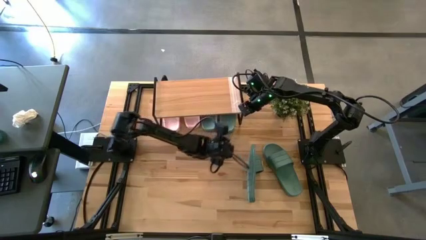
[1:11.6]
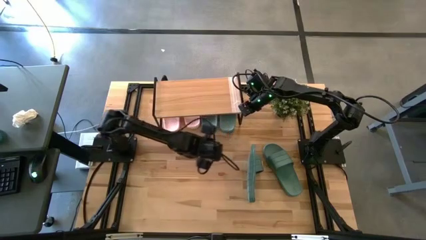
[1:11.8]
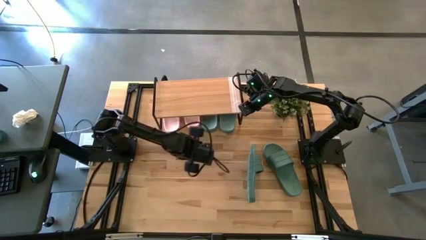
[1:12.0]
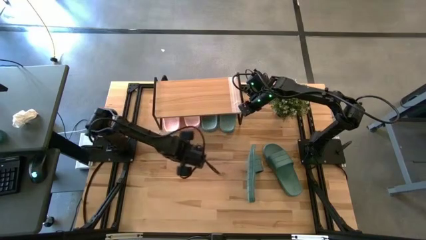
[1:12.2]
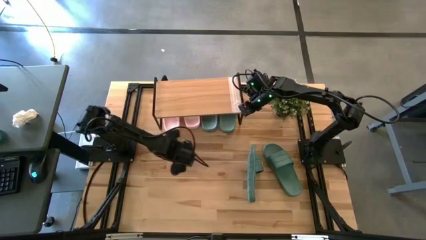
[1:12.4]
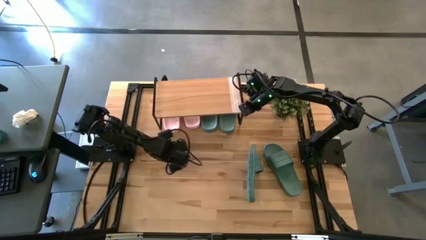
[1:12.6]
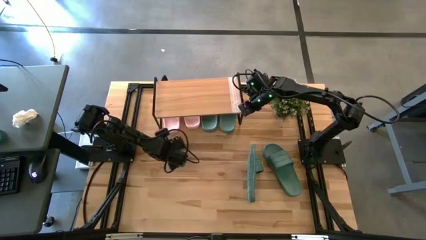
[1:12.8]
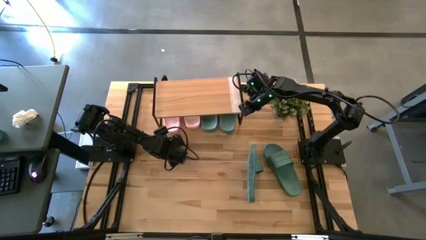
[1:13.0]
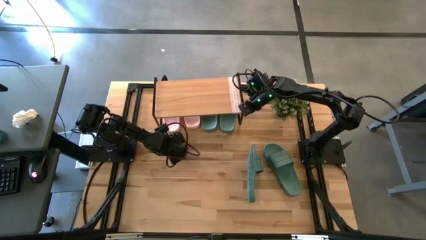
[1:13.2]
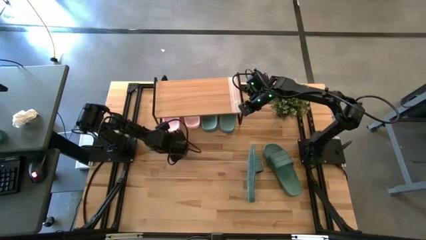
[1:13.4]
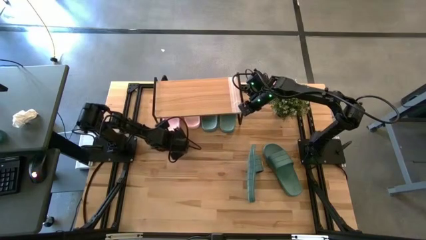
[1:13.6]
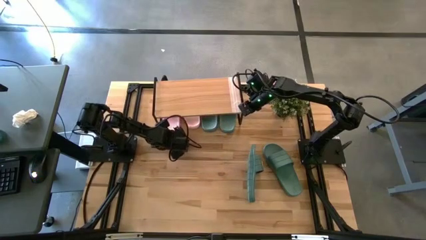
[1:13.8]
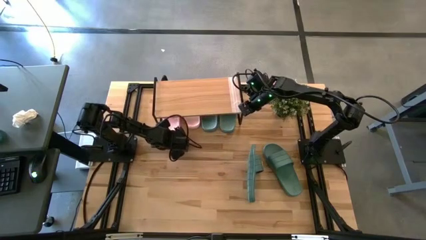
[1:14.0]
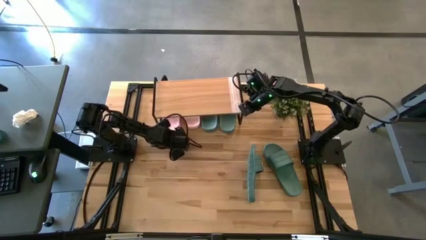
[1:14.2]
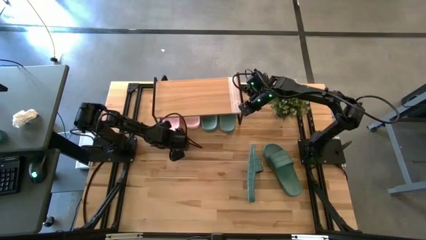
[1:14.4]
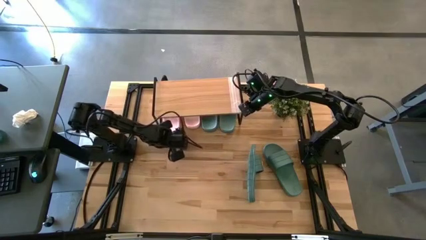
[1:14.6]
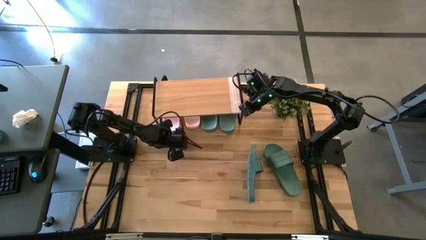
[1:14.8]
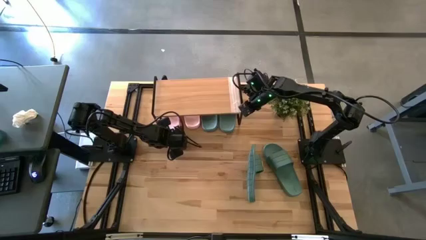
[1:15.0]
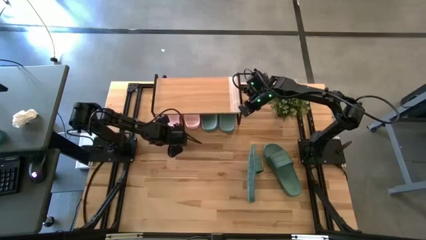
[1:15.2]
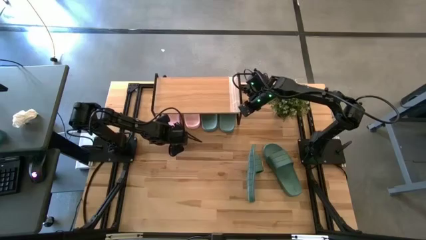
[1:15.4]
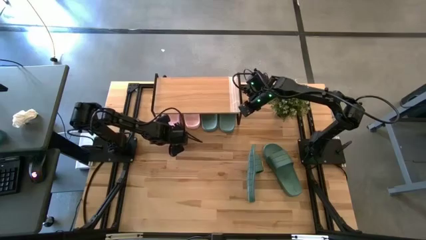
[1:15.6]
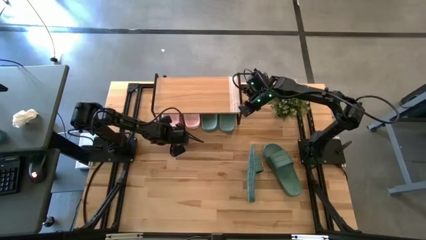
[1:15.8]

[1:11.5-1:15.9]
Task: Pick and place slides into the shelf
Adjust the left pink slipper on the bottom shelf

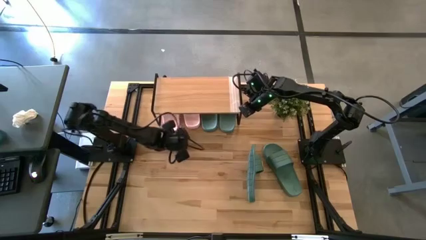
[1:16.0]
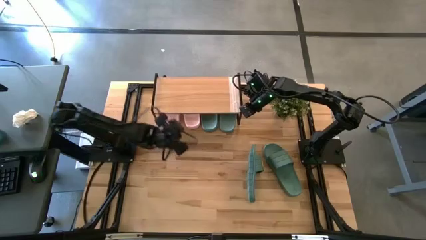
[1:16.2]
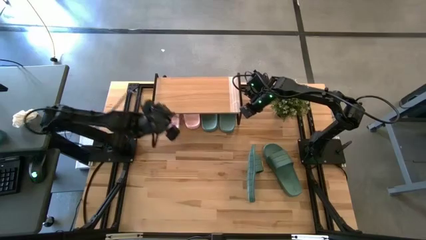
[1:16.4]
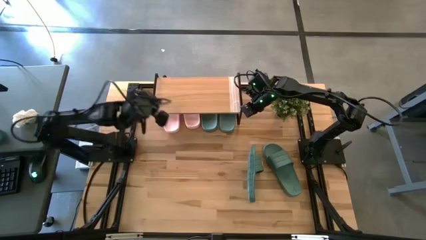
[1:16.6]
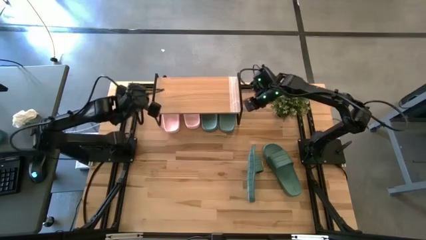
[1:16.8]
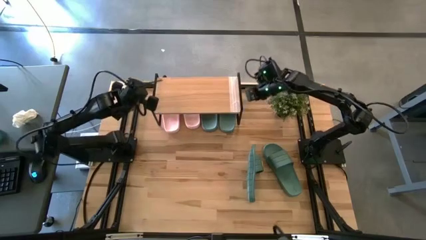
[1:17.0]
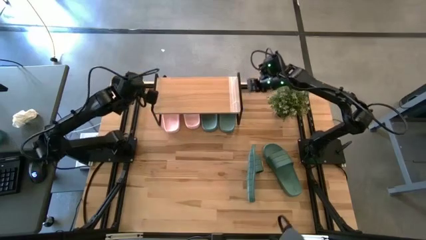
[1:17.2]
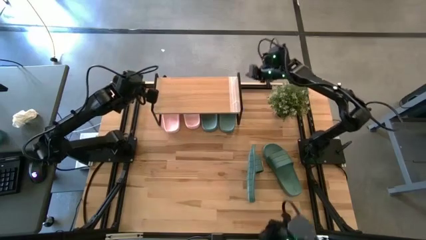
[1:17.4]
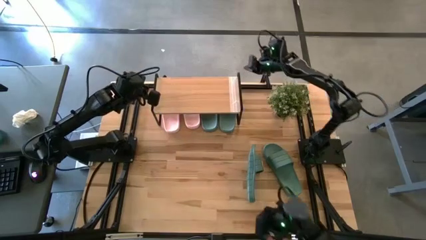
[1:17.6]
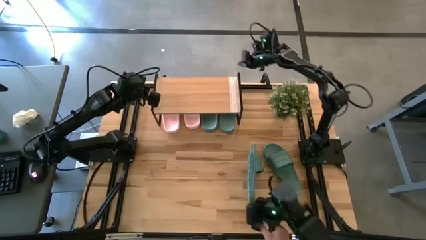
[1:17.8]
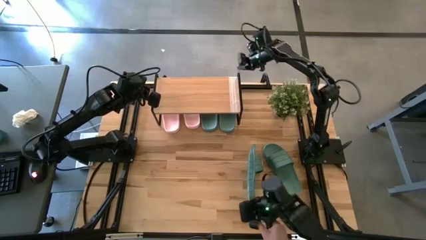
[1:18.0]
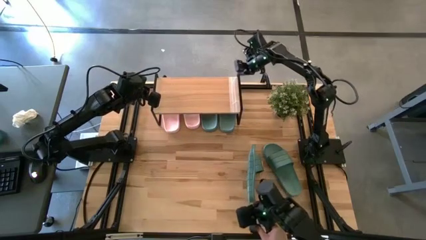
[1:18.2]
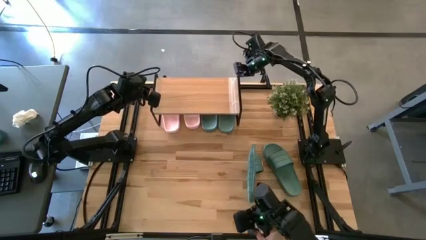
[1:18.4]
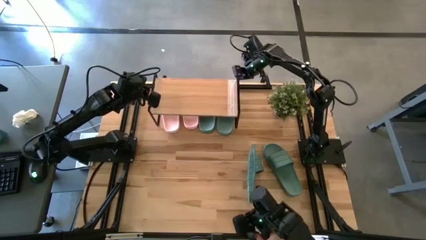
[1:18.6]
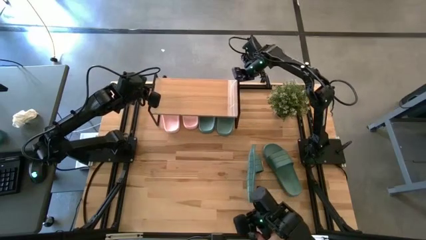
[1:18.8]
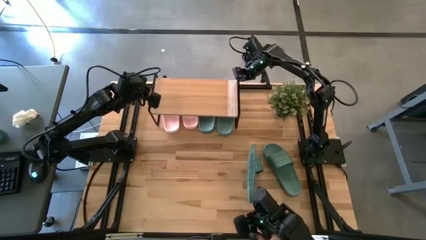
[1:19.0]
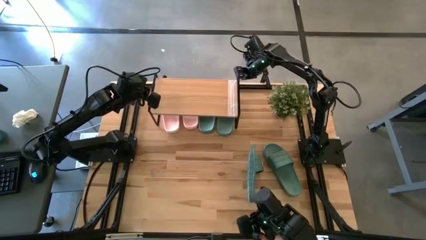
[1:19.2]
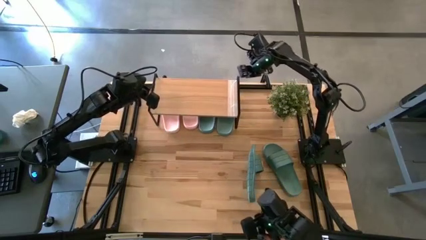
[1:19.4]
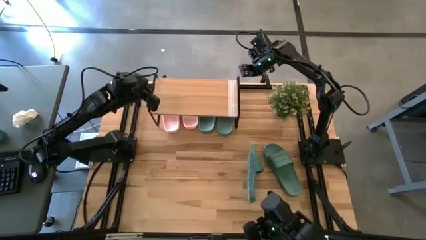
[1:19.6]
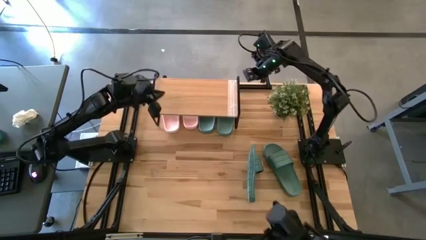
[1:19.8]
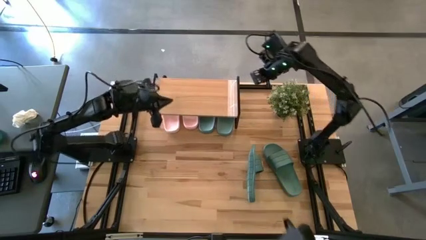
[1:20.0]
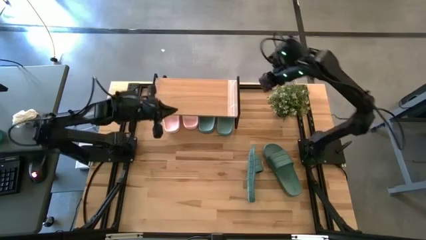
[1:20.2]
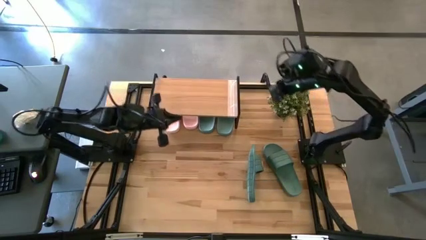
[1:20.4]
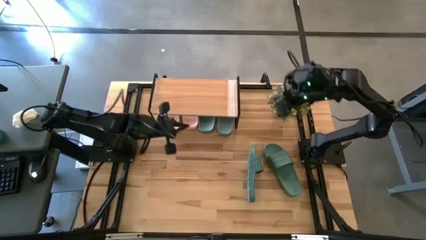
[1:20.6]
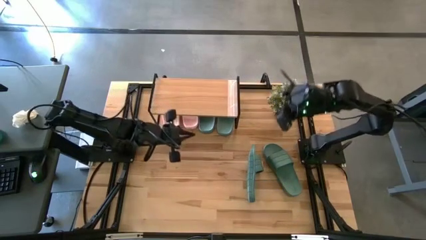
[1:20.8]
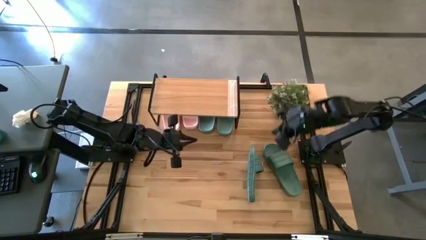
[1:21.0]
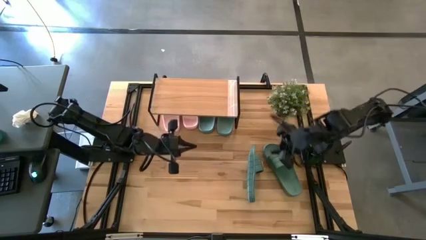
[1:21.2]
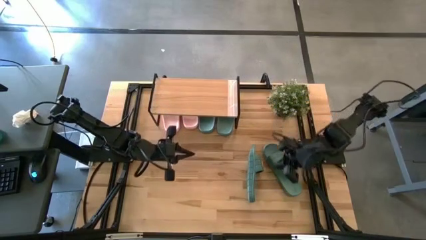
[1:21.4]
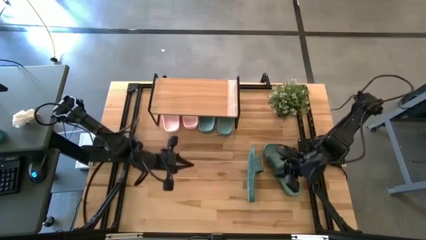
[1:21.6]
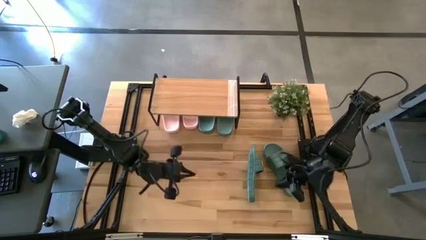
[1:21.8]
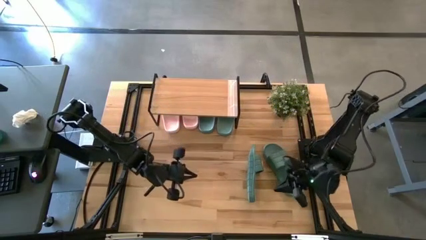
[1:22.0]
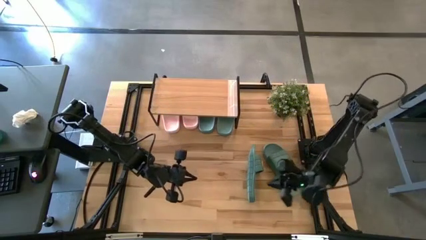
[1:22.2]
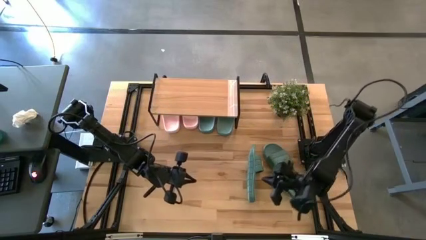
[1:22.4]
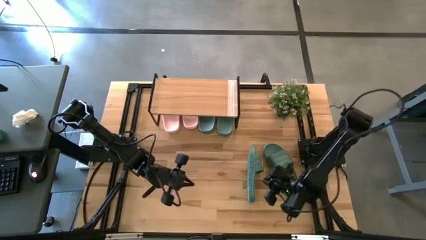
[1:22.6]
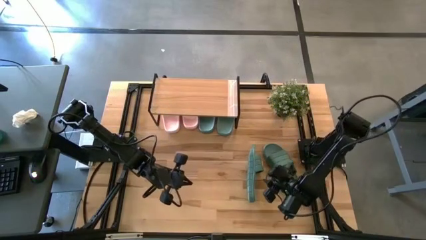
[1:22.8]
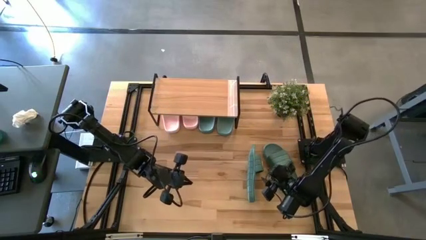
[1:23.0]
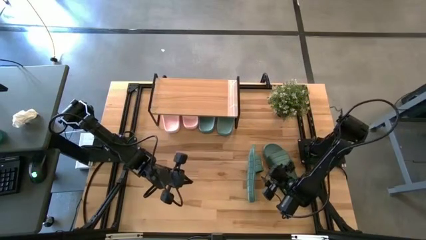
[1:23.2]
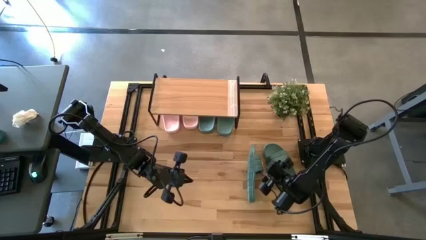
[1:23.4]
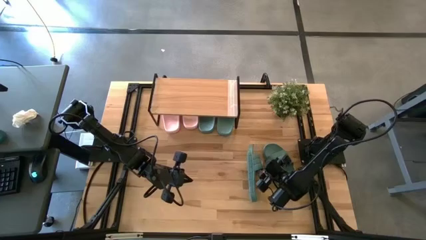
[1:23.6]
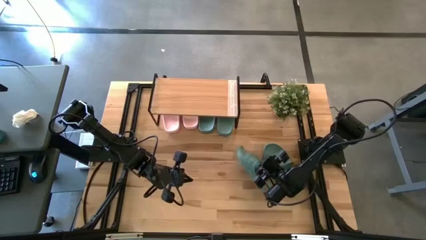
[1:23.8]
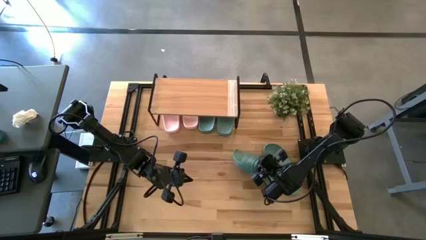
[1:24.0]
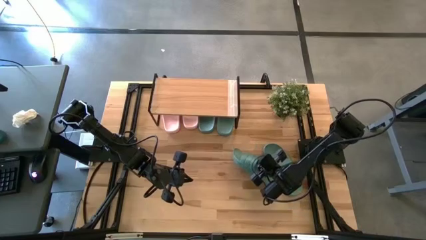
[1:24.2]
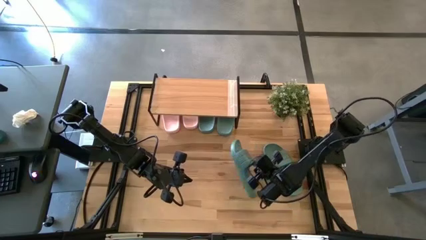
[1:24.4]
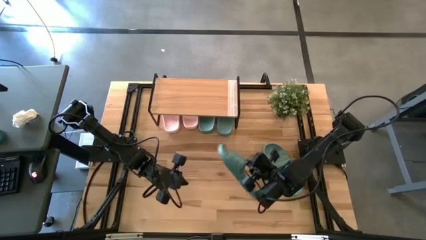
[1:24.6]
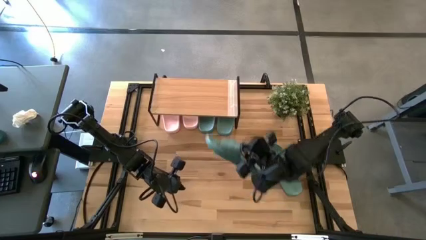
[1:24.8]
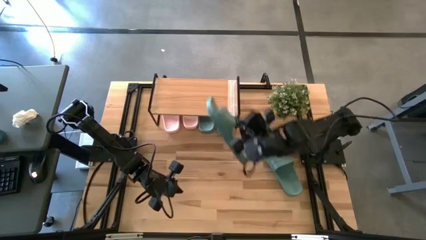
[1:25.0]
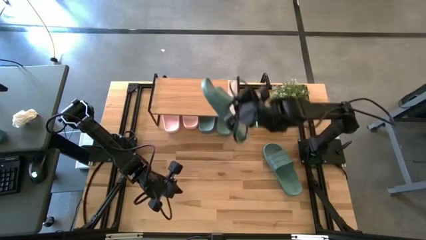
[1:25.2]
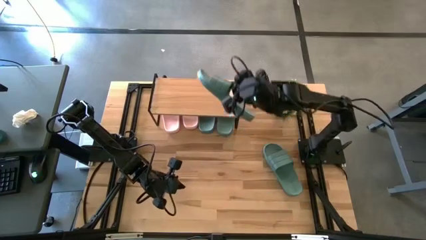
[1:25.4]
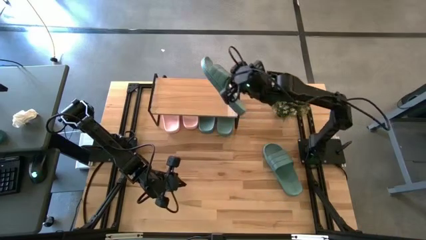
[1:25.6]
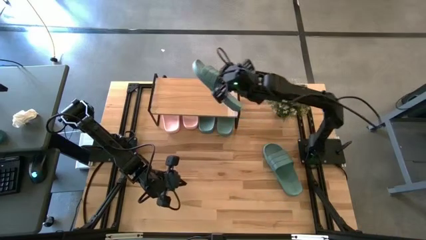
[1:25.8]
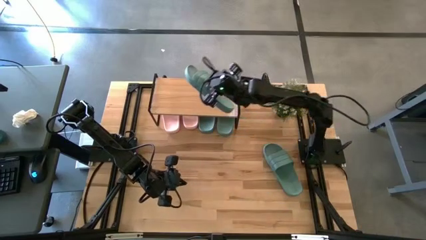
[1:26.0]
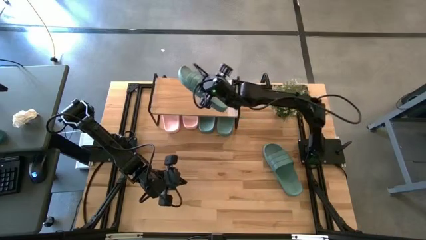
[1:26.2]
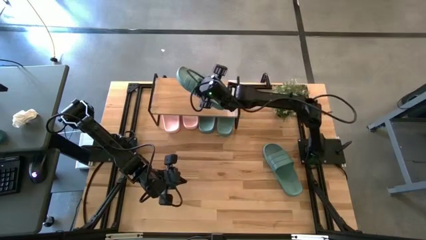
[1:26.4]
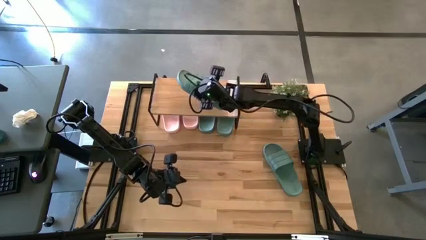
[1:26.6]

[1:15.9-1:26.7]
Put the left green slipper on the top shelf
